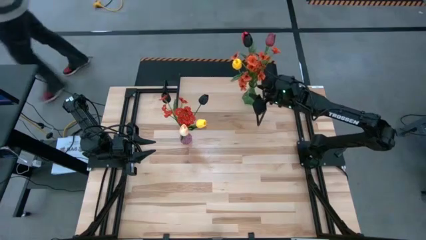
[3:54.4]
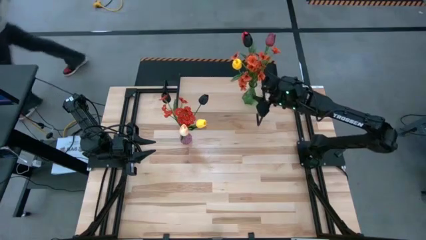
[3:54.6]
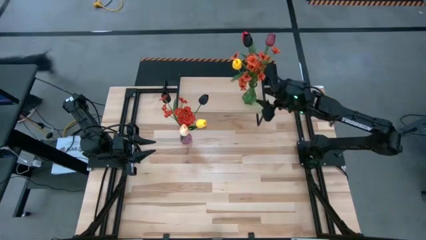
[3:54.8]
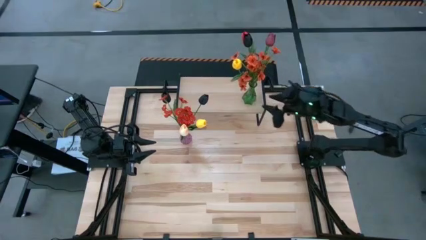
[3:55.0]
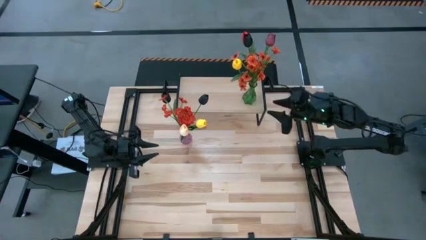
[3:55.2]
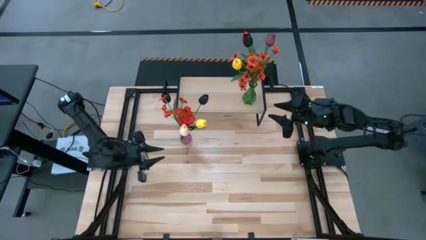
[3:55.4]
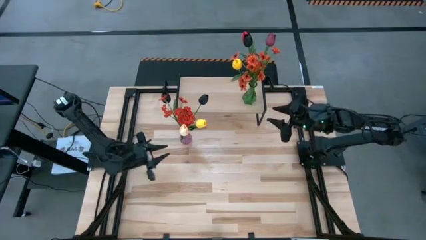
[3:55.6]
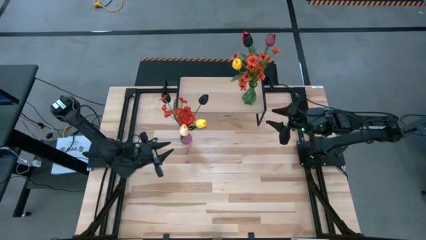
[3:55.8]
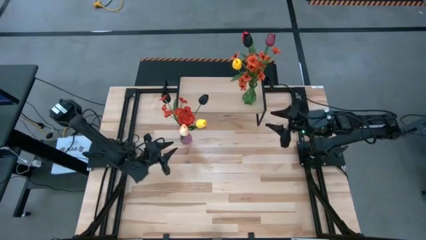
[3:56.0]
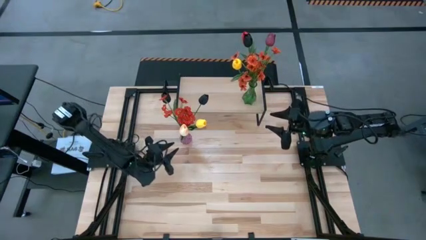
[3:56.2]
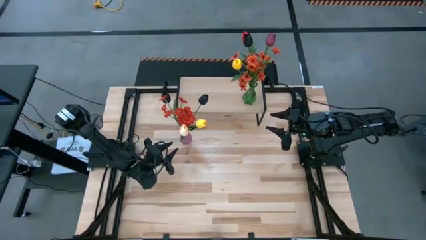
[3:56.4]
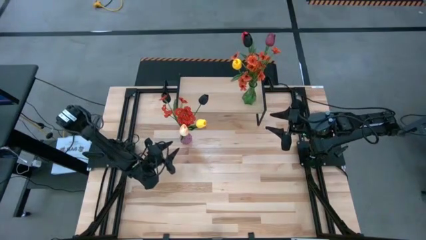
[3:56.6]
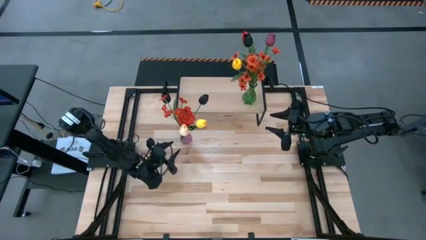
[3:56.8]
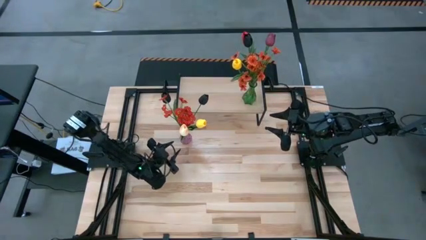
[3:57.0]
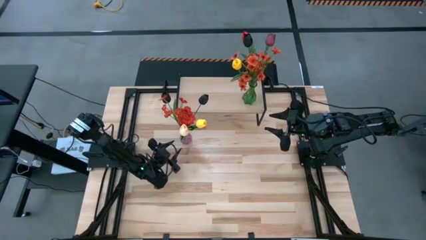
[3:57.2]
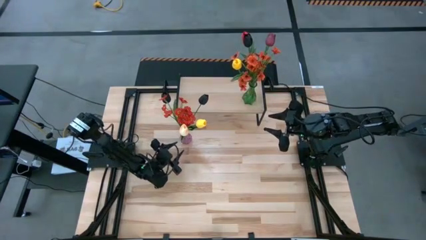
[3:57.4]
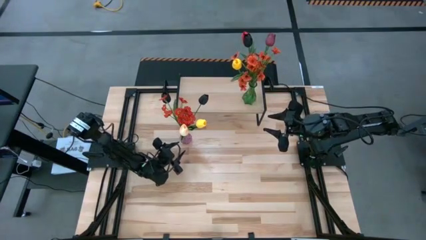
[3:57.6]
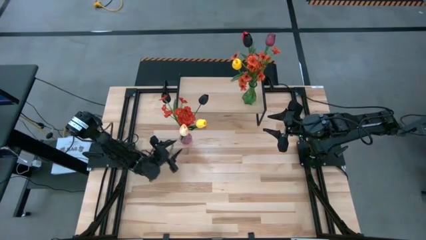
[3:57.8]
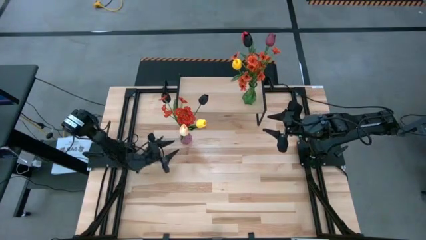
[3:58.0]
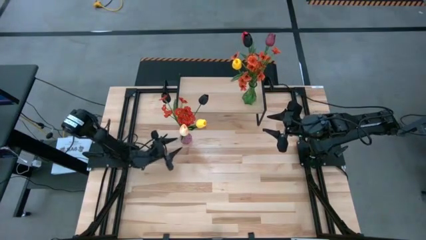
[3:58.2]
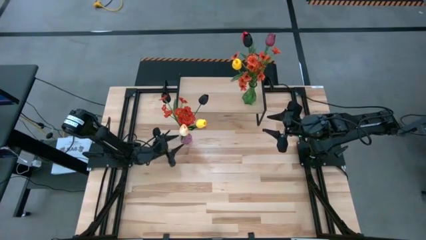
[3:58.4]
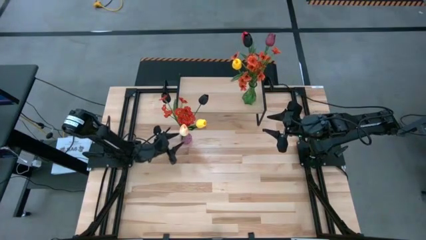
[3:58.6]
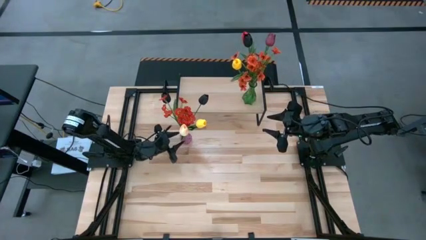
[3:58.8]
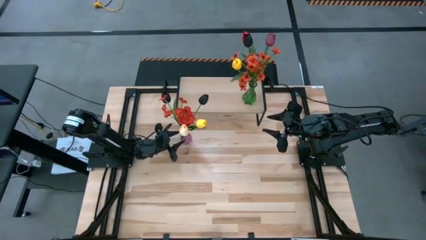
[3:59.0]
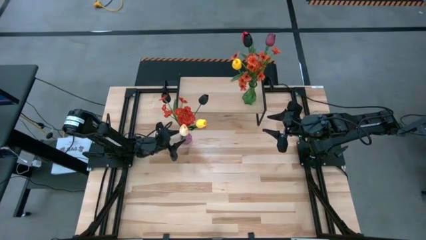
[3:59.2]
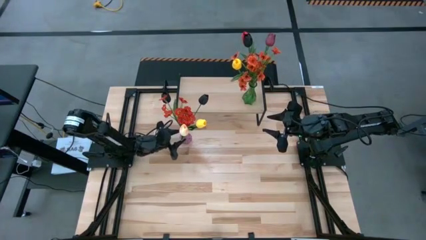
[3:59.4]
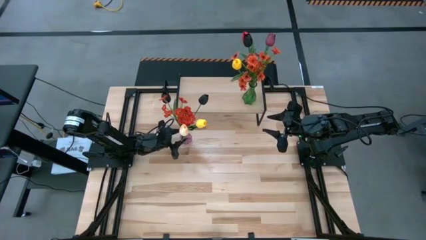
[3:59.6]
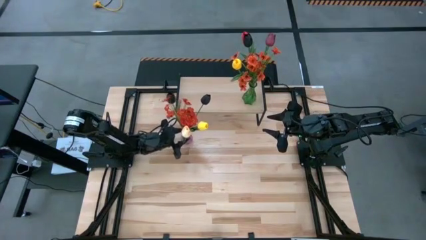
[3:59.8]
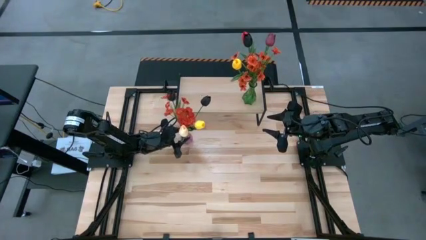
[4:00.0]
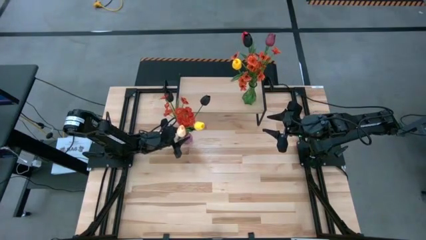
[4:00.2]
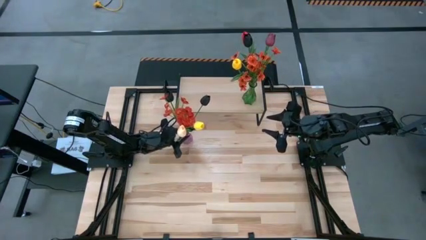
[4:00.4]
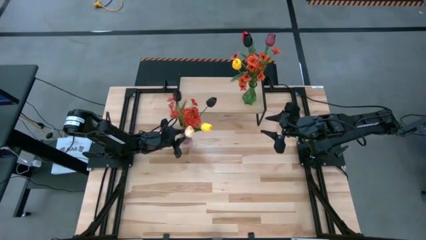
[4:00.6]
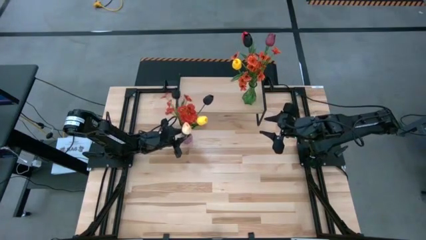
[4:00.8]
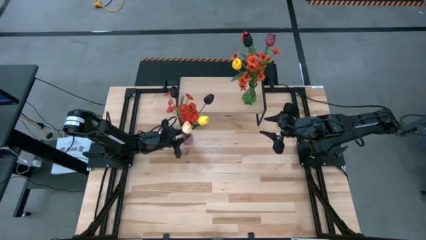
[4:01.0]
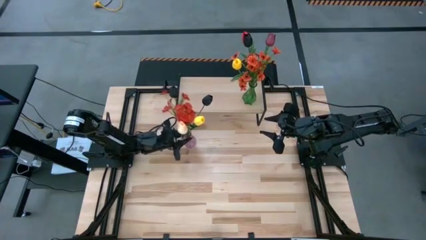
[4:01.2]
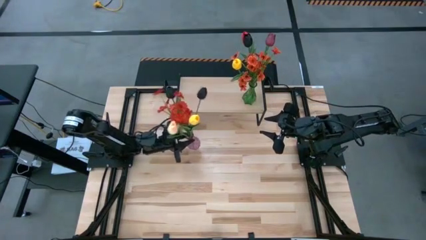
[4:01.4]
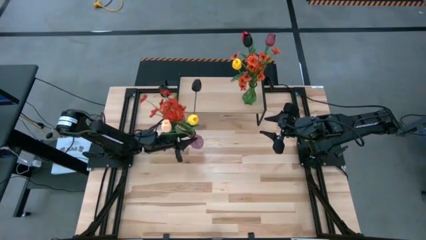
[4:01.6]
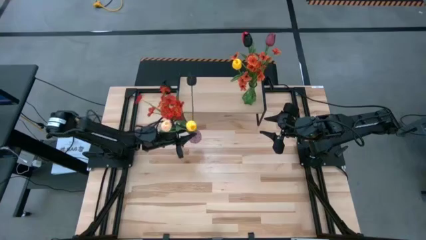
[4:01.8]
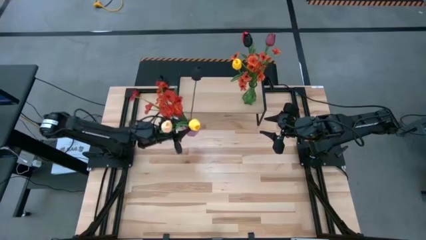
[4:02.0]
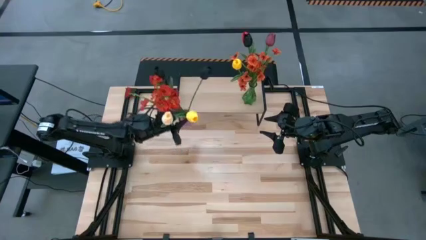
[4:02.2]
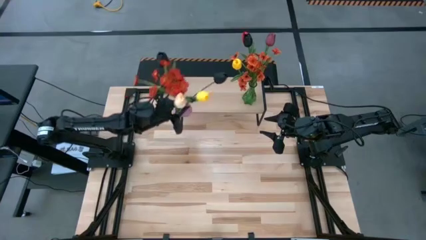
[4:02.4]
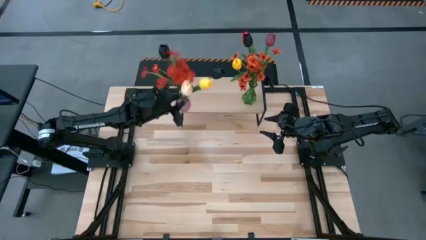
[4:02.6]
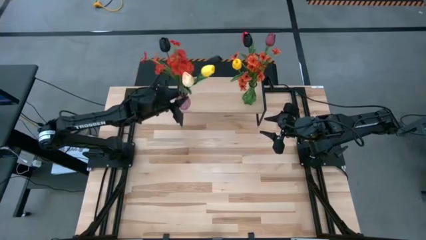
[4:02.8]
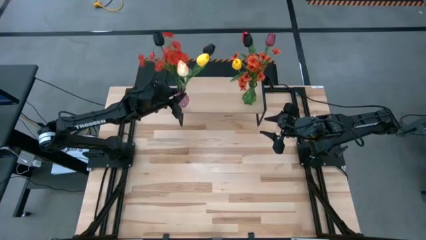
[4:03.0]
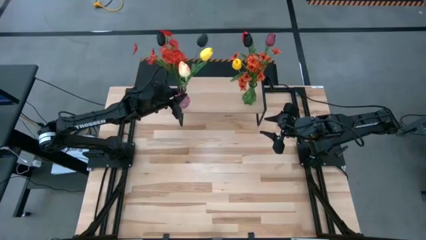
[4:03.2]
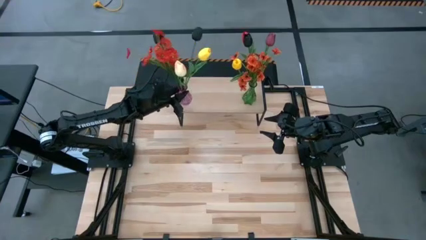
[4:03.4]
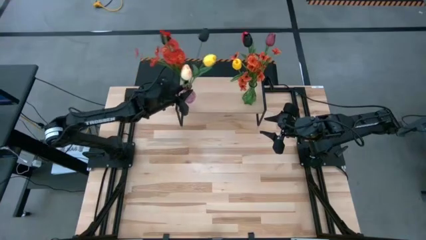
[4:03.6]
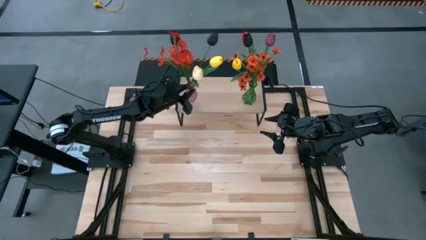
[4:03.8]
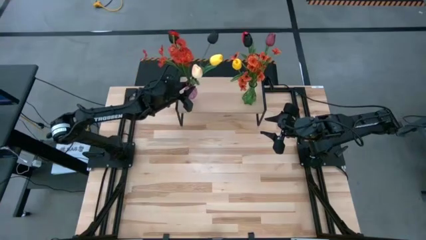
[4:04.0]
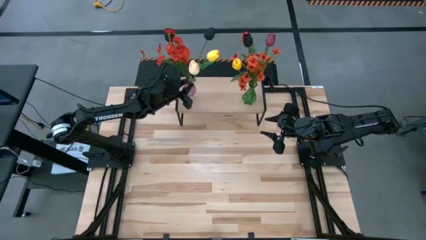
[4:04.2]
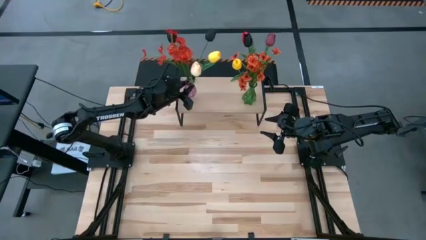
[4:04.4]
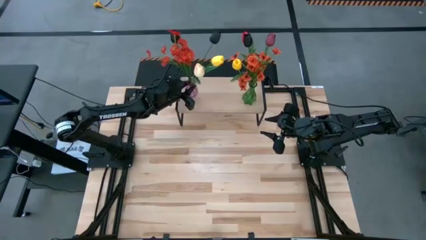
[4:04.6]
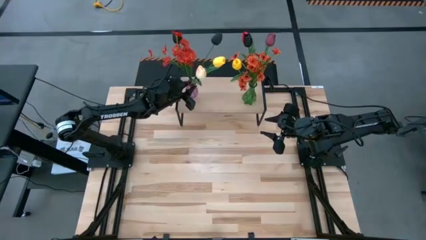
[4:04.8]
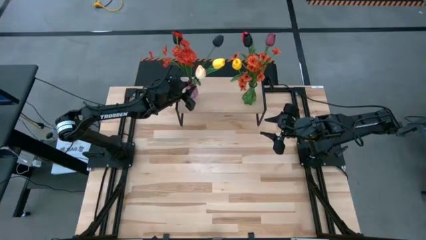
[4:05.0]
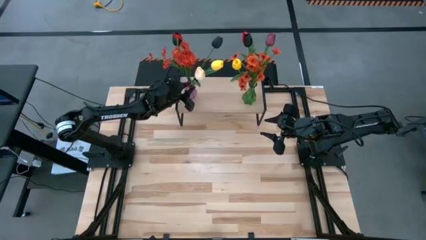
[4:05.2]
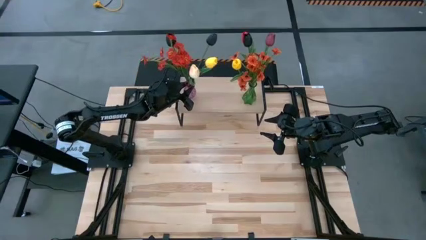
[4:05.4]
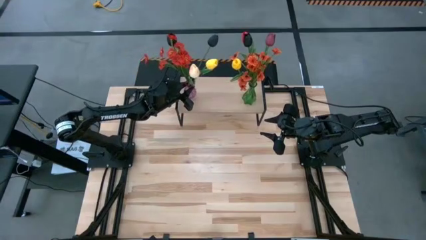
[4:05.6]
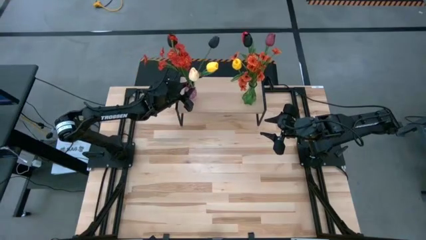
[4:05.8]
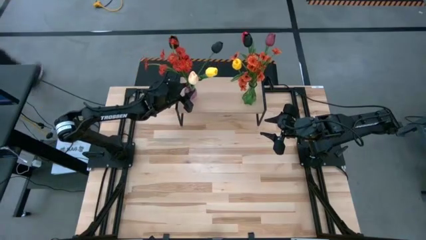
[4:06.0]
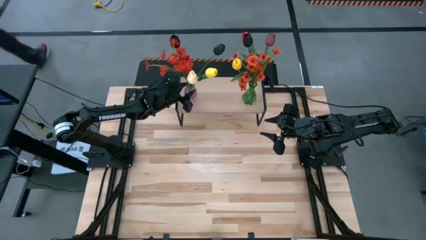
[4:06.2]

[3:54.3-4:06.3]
Task: Pick and place flowers into a vace then onto a shelf
Put the purple vase on the shelf

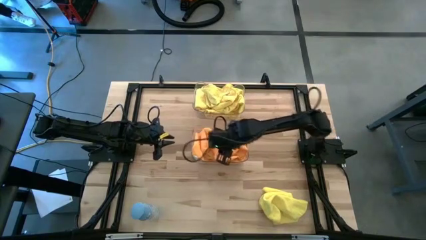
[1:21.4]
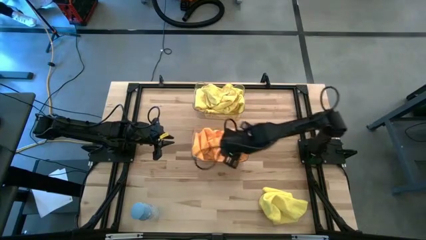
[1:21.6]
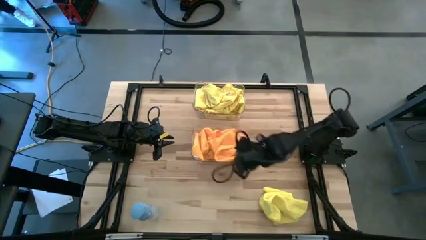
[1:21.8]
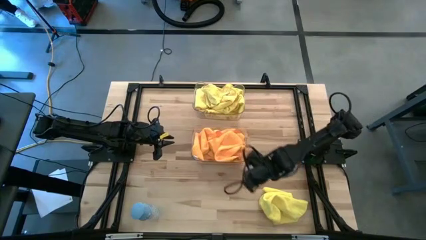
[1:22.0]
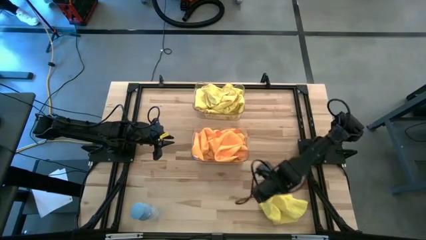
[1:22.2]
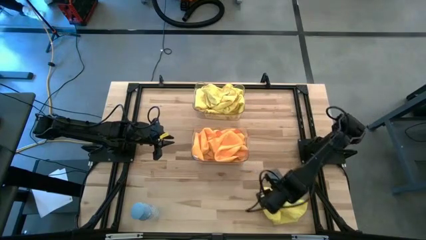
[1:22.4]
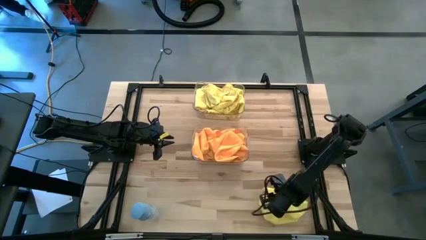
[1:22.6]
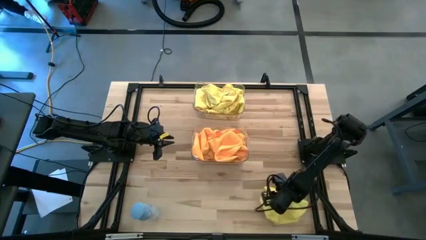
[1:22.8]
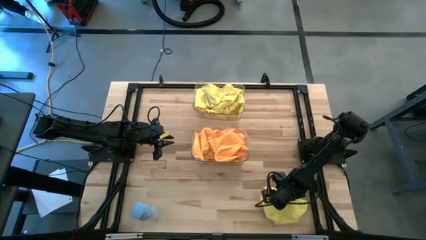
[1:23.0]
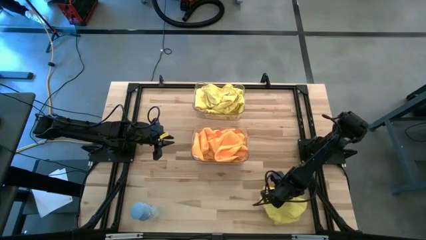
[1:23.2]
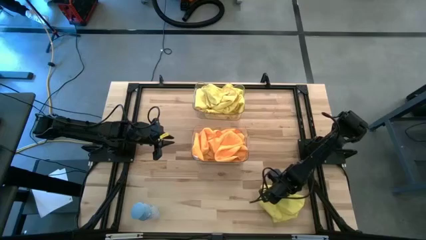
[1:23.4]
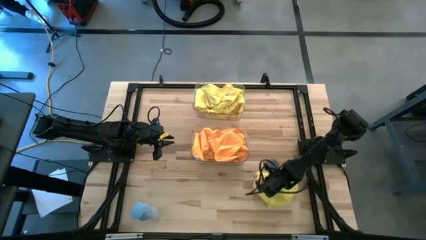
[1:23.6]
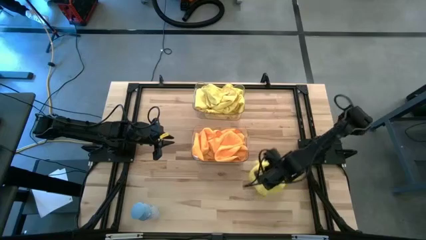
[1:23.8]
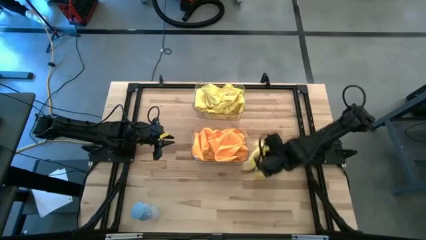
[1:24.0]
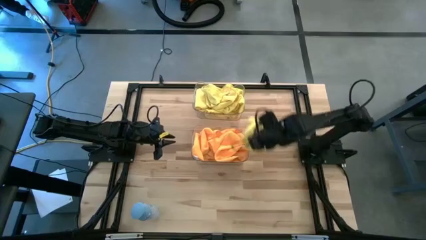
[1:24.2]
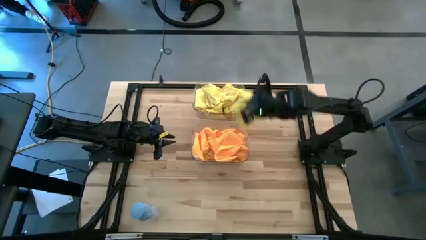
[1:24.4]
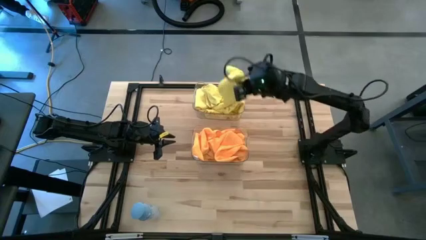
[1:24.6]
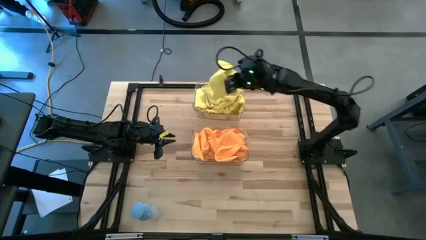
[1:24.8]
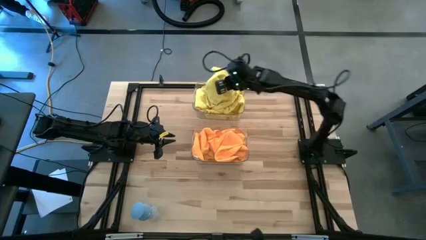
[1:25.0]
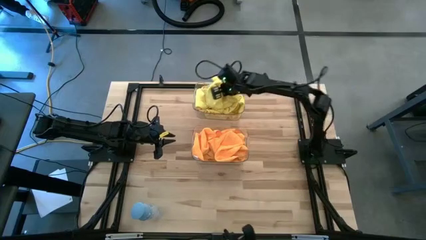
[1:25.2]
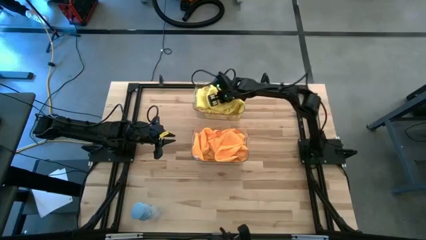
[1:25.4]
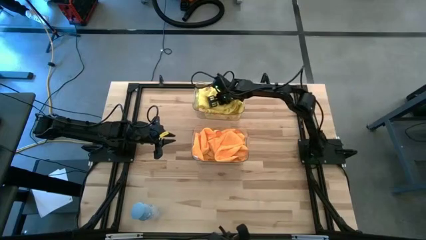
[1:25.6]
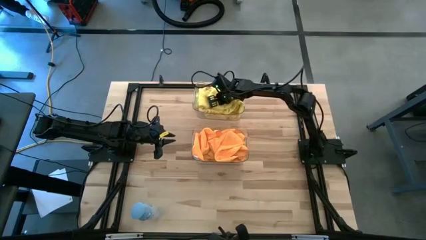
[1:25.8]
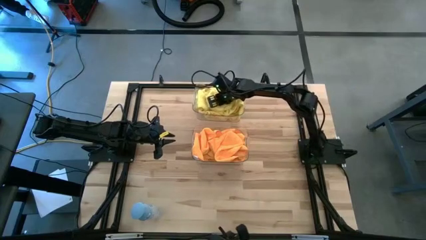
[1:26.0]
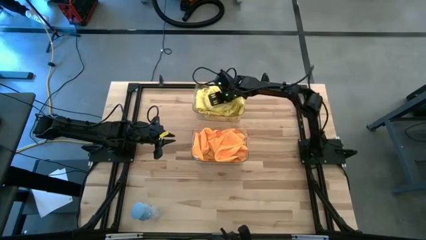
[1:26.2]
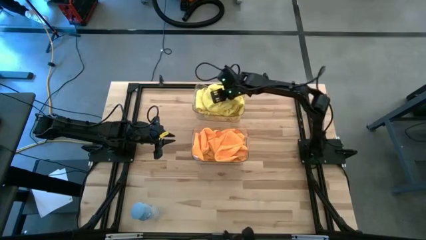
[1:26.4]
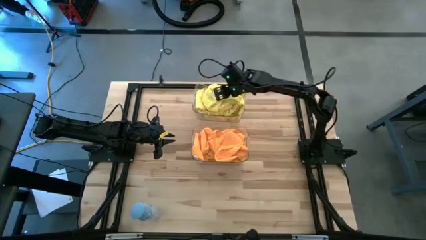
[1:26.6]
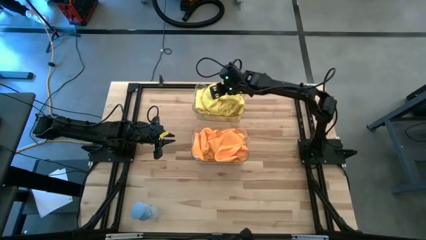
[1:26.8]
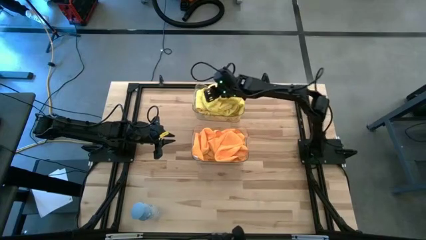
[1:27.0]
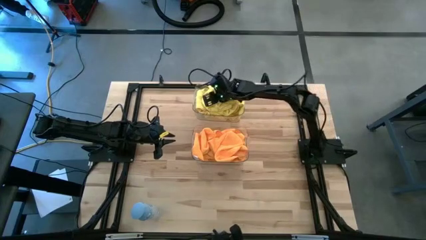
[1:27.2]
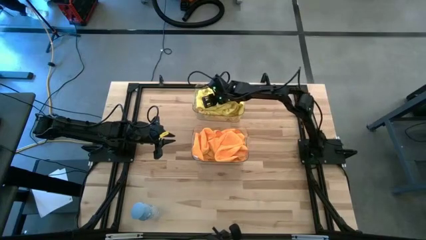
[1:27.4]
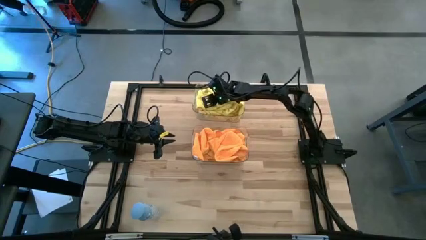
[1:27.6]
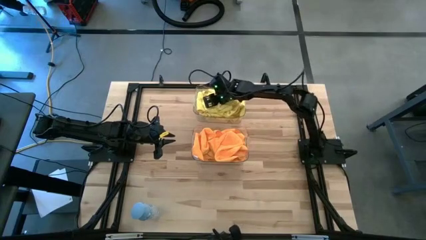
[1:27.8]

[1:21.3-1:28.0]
Task: Sort microfiber towel by color & place in baskets
Put the yellow microfiber towel into the top transparent bin
